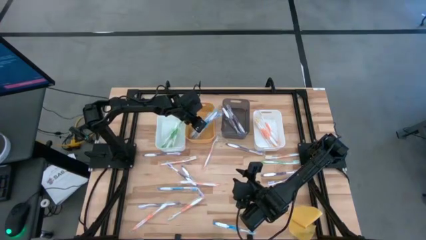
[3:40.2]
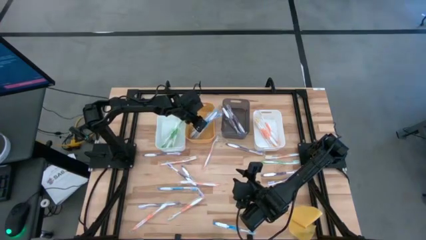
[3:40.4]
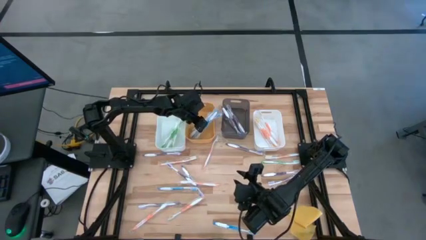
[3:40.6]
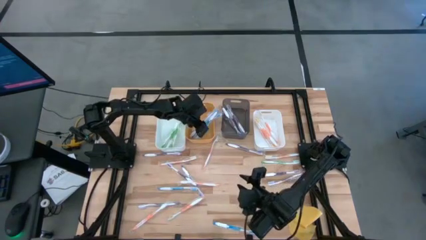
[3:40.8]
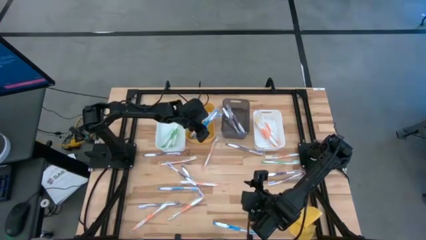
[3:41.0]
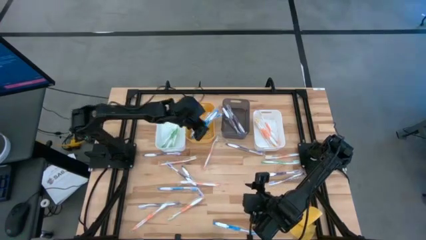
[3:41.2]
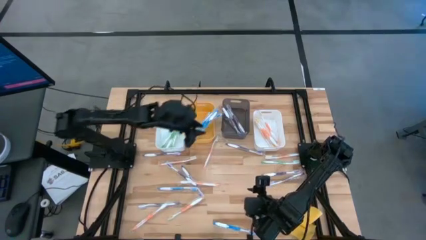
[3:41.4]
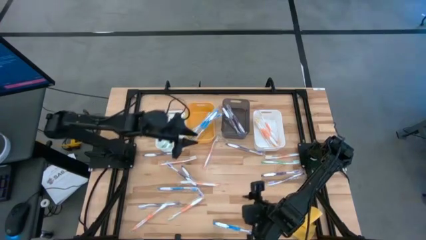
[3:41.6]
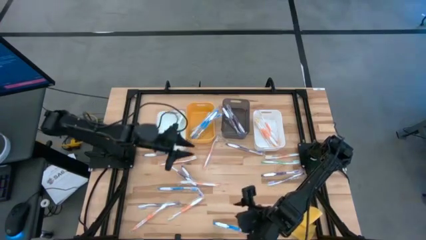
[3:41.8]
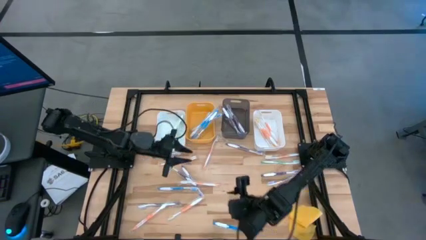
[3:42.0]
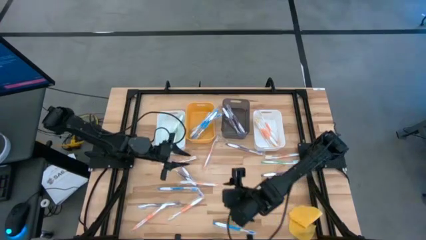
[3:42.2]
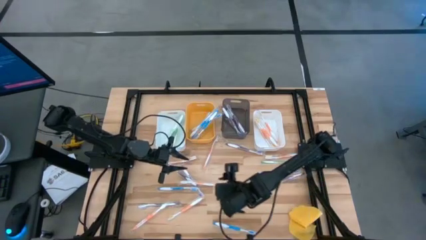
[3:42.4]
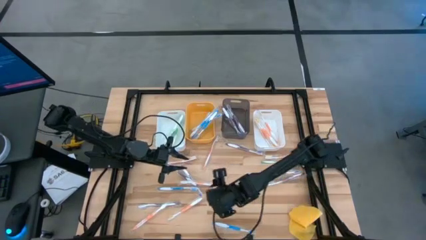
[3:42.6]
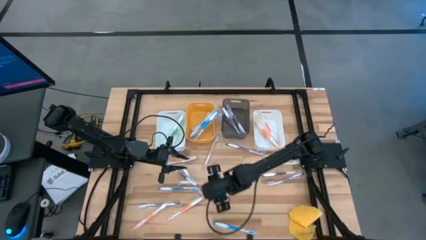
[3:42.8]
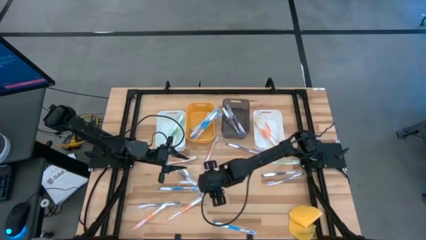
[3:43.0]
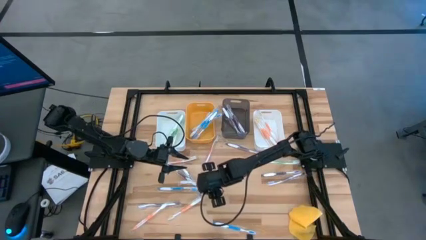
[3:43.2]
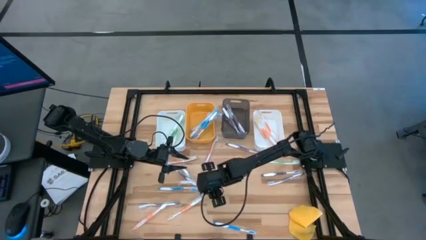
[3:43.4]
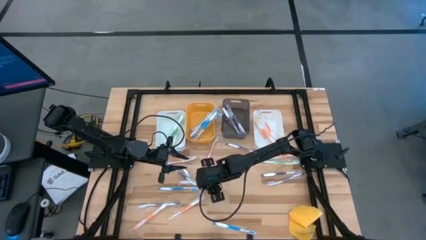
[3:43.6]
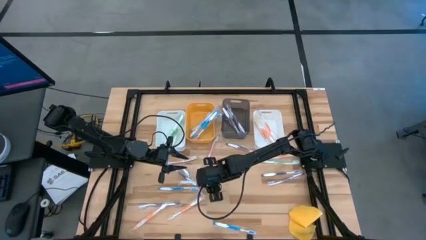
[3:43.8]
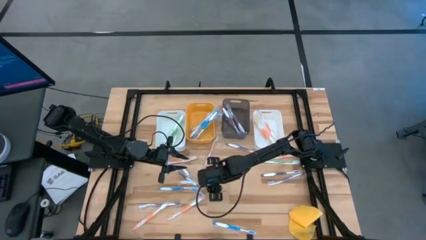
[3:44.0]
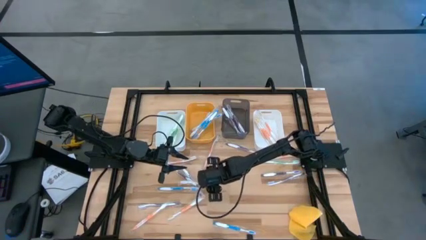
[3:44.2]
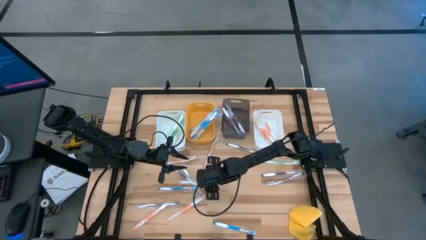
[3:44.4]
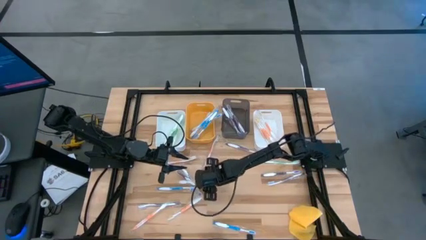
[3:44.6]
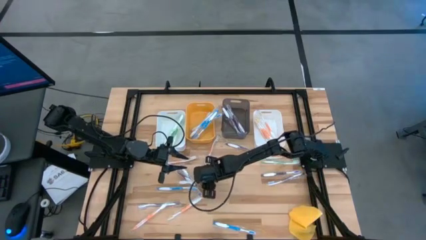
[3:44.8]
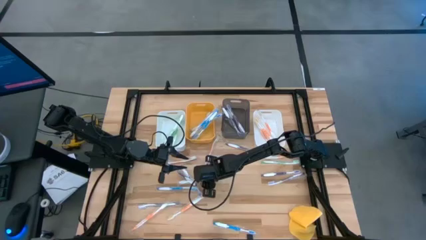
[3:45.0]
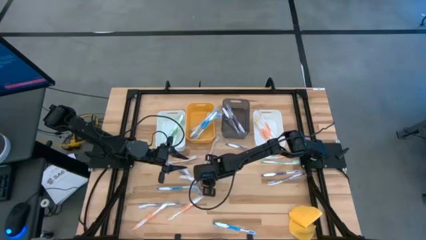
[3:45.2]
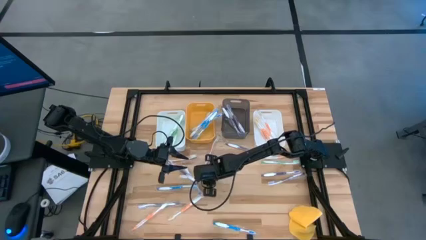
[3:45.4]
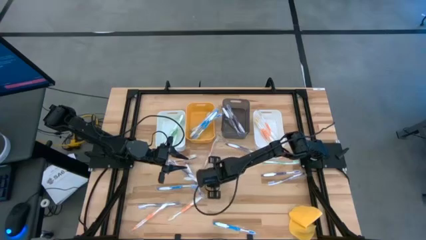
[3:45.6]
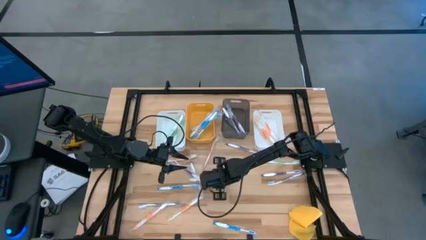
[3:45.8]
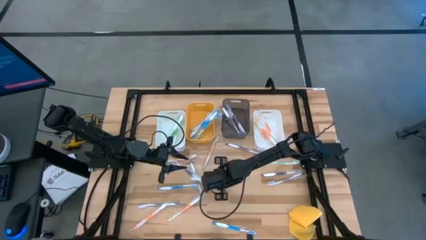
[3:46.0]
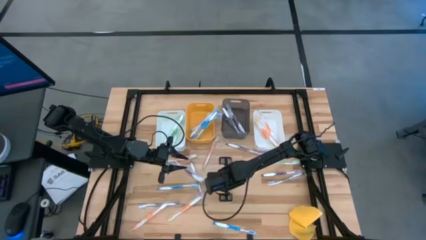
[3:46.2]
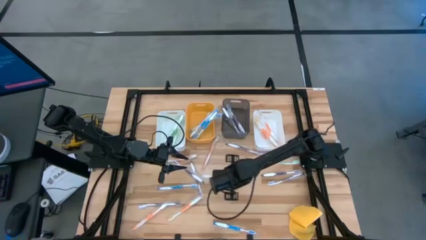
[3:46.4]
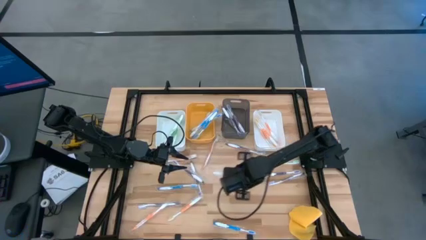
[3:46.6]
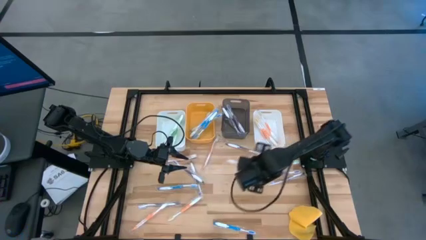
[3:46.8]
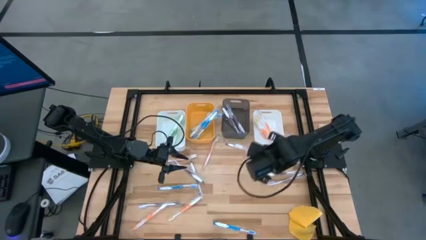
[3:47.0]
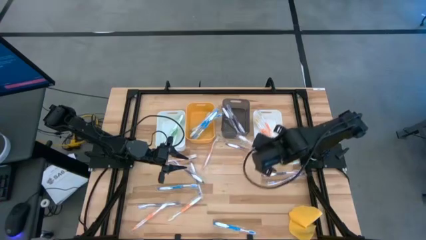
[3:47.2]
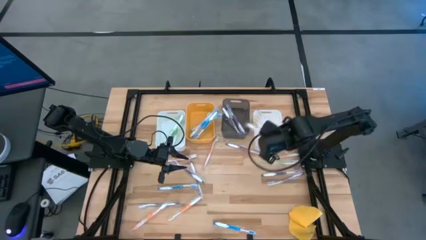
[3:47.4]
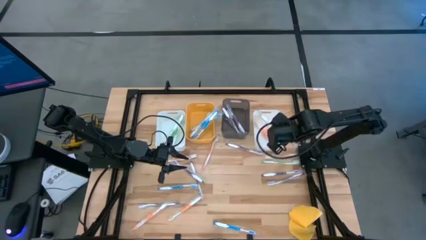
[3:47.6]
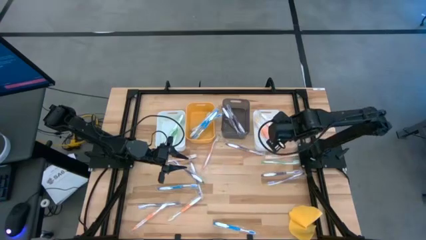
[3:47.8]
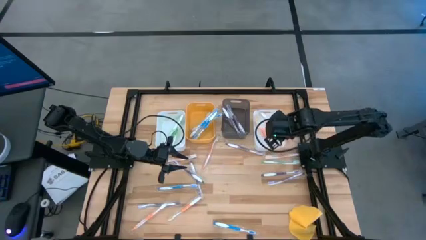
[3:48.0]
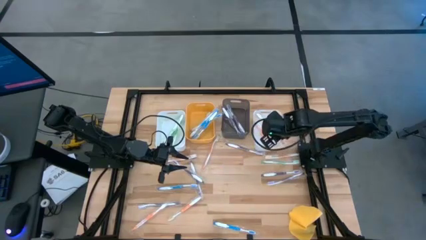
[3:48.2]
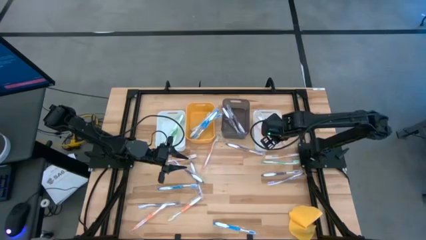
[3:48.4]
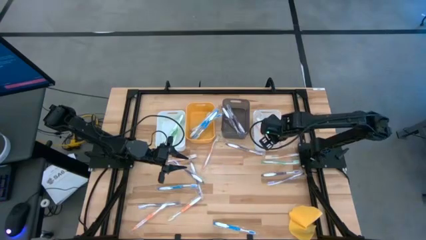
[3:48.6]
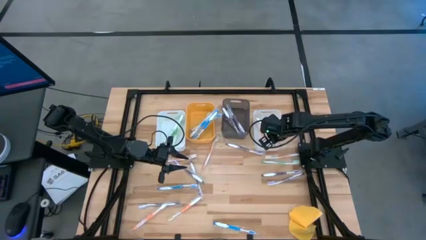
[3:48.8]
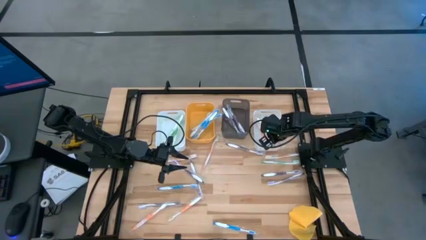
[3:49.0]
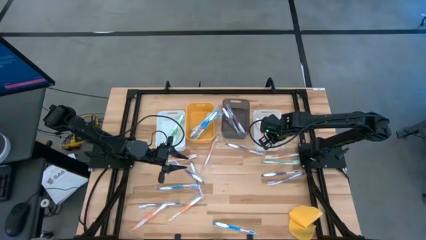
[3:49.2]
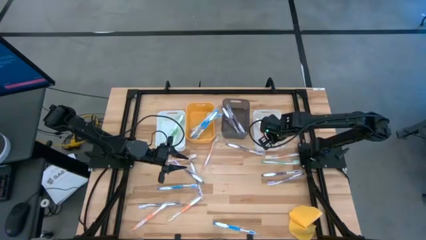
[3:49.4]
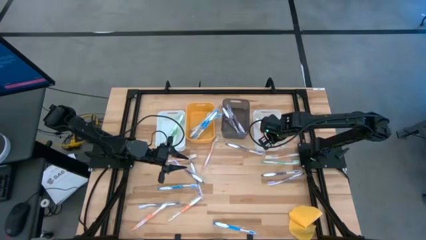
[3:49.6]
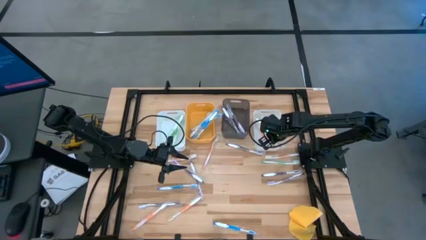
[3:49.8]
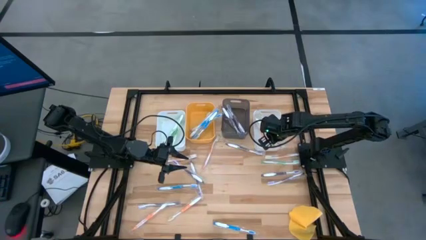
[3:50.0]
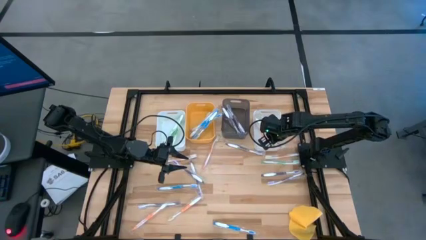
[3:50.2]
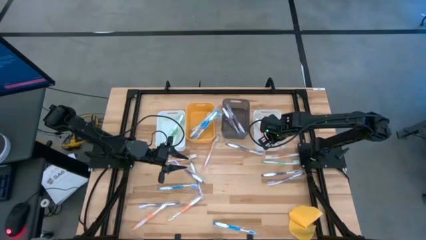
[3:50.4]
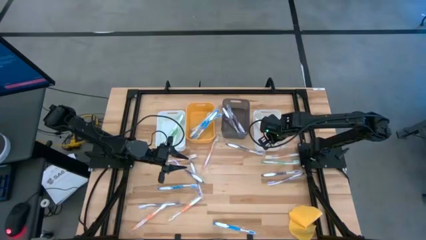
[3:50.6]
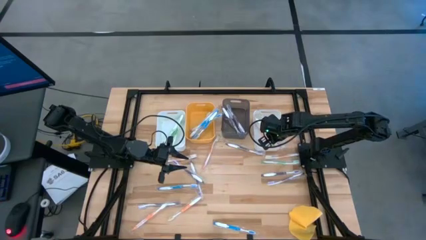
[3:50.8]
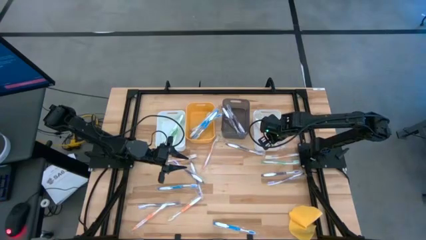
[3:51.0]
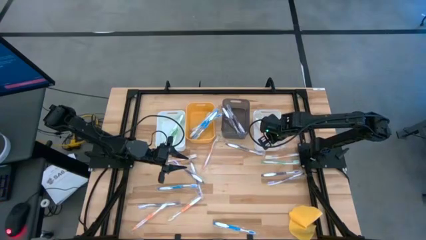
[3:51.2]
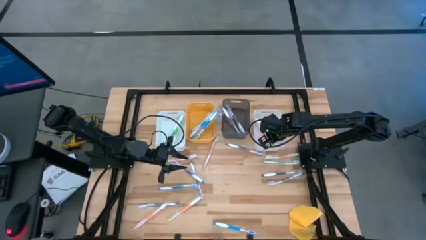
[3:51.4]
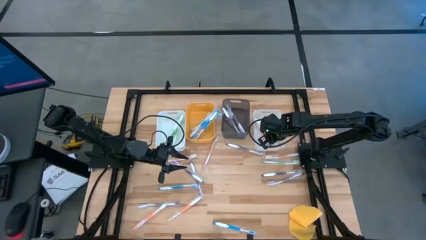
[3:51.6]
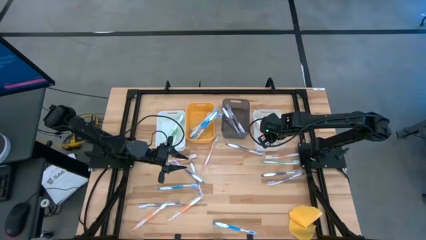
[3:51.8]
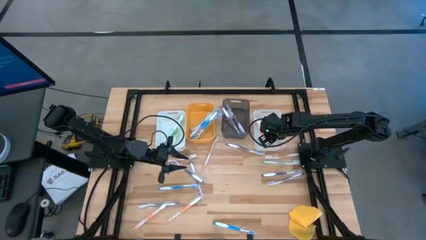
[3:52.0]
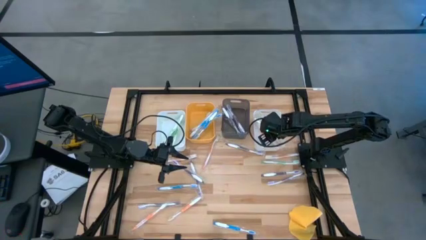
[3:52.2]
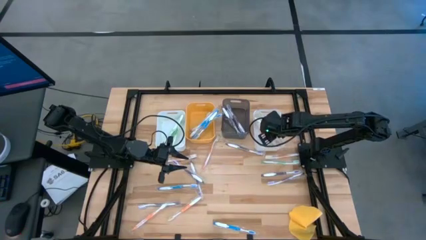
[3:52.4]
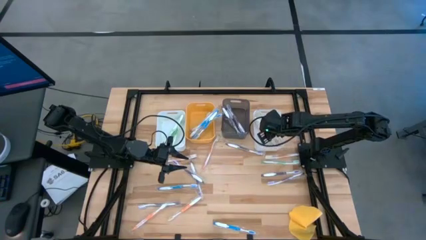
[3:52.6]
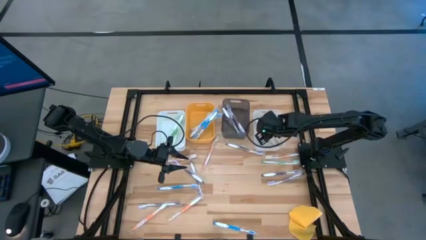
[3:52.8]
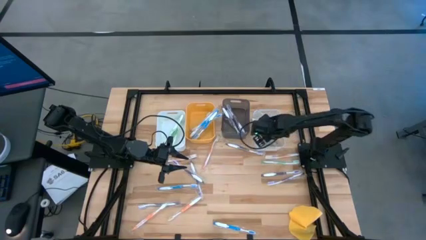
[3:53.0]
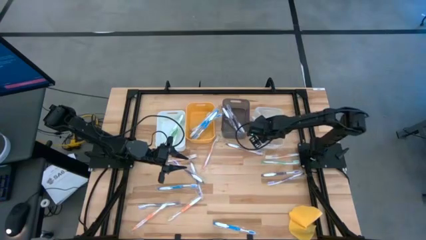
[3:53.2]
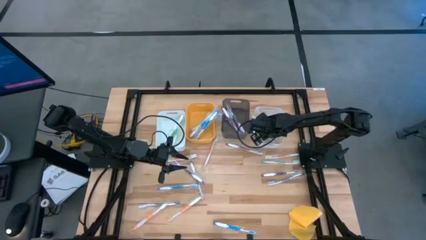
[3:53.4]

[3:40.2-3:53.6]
Task: Pick & Place Toothbrushes
Put the orange toothbrush into the right white bin
